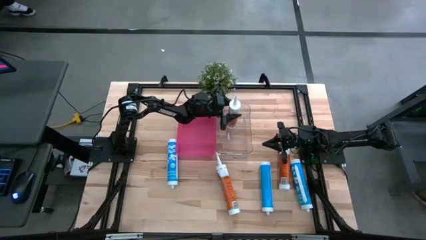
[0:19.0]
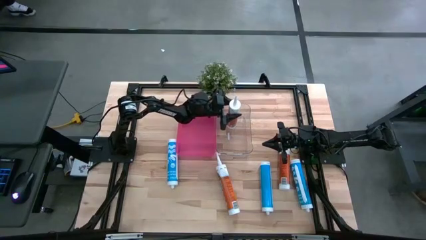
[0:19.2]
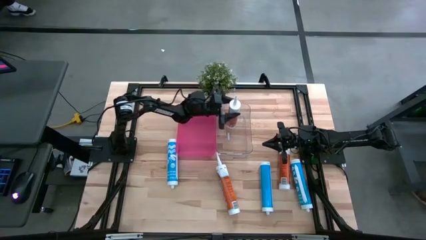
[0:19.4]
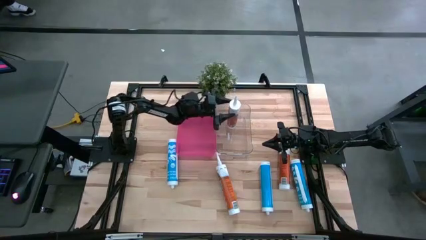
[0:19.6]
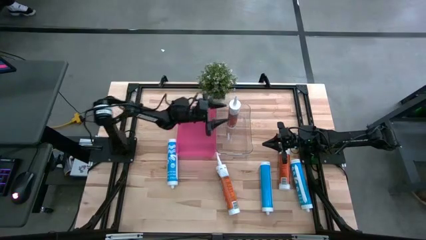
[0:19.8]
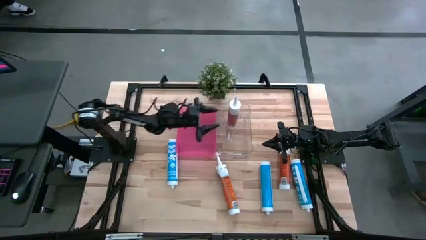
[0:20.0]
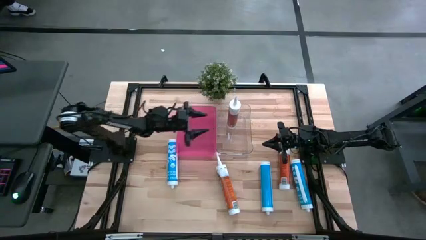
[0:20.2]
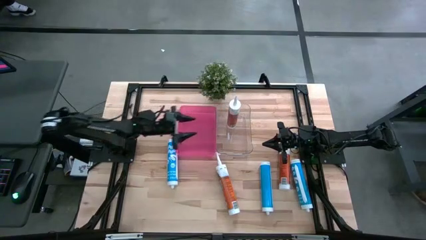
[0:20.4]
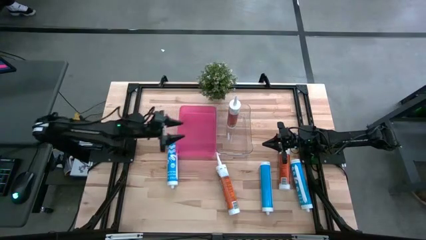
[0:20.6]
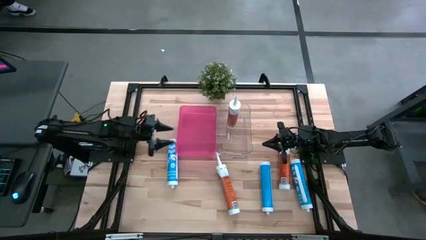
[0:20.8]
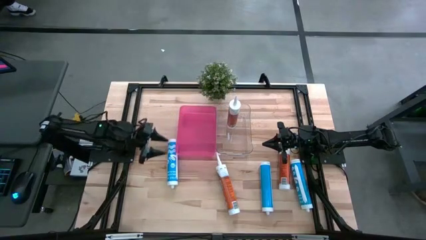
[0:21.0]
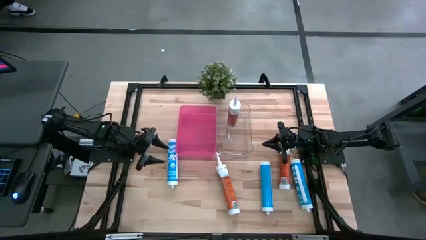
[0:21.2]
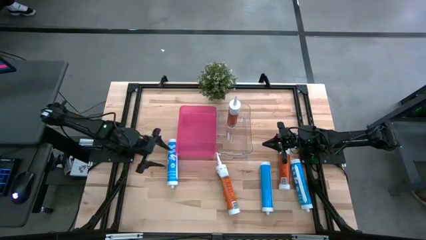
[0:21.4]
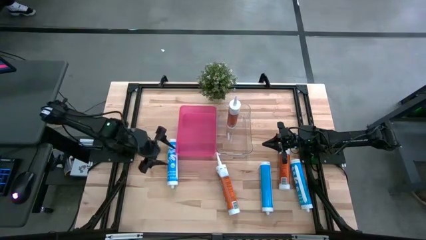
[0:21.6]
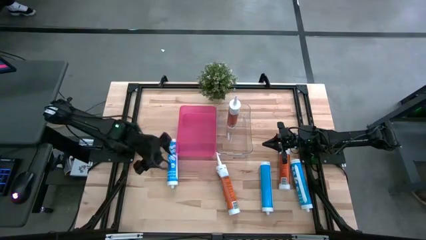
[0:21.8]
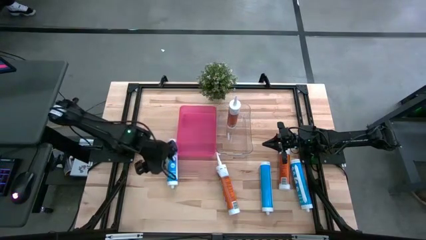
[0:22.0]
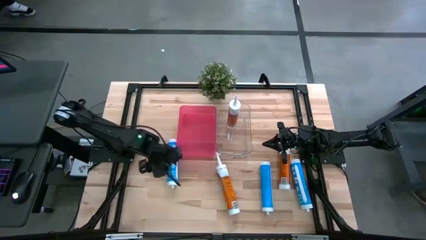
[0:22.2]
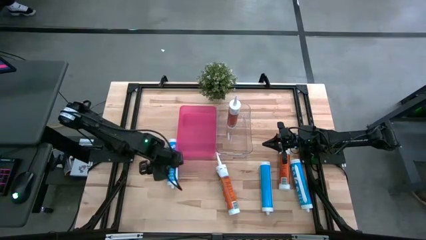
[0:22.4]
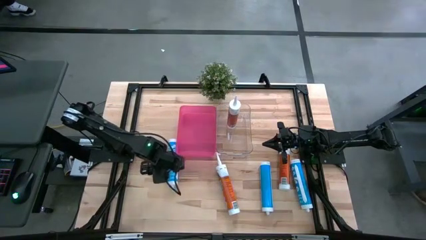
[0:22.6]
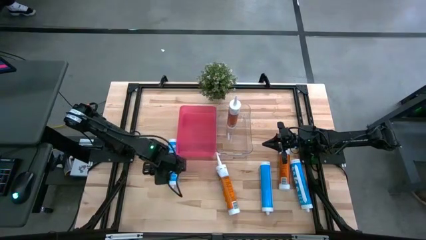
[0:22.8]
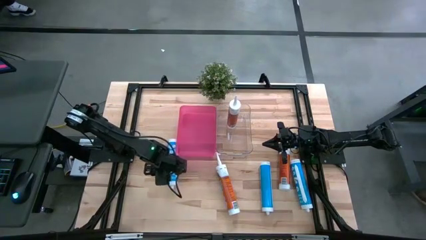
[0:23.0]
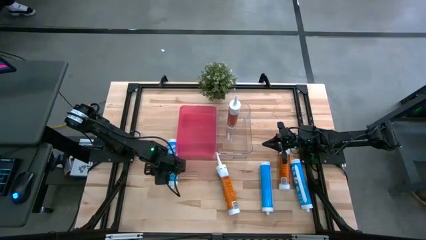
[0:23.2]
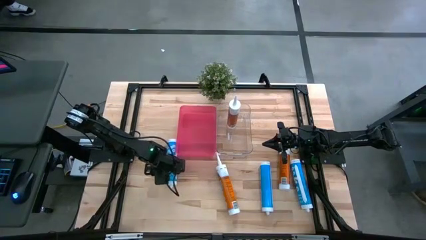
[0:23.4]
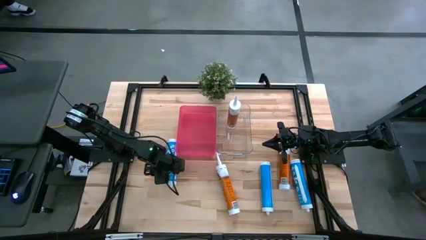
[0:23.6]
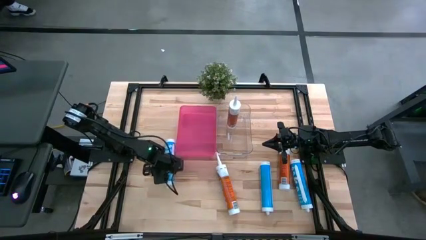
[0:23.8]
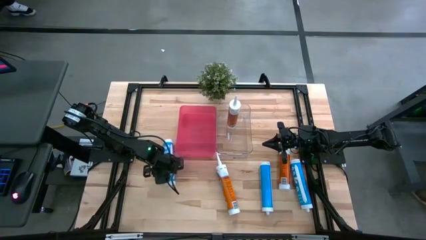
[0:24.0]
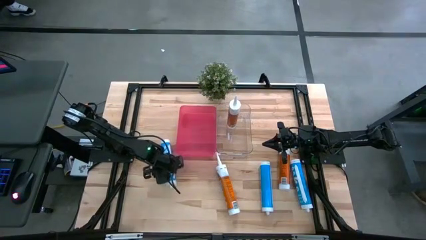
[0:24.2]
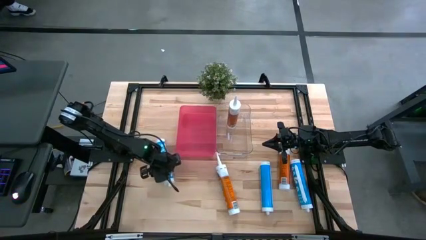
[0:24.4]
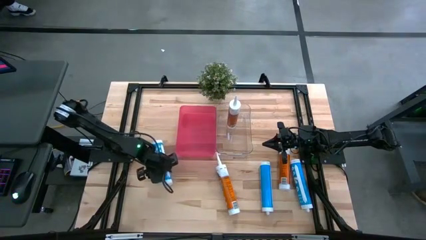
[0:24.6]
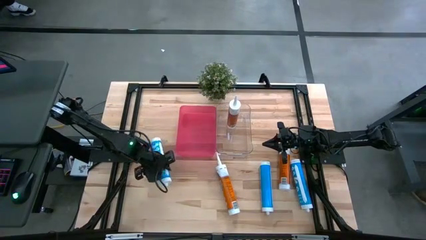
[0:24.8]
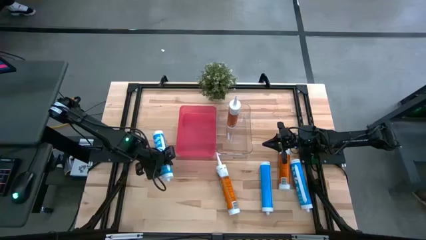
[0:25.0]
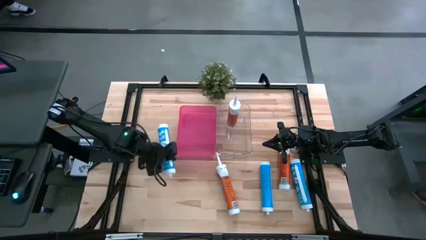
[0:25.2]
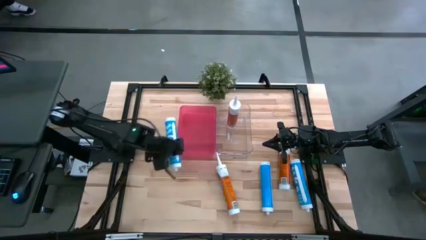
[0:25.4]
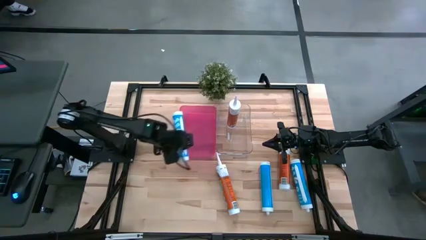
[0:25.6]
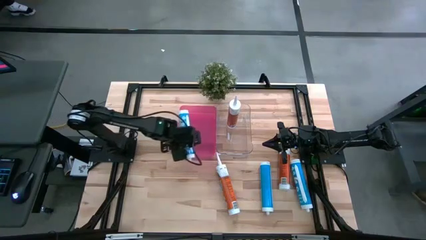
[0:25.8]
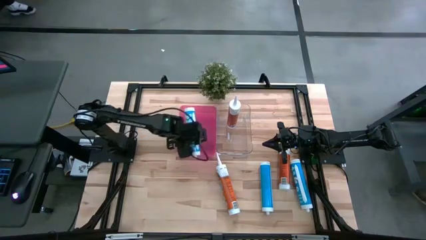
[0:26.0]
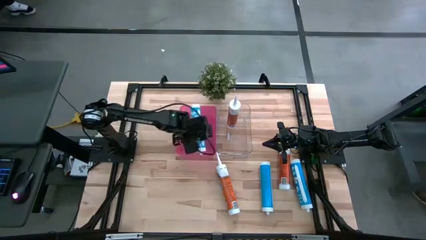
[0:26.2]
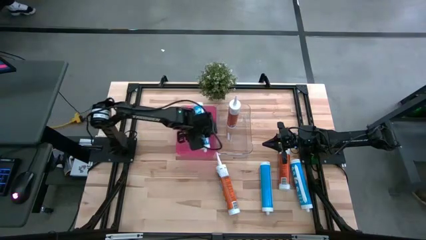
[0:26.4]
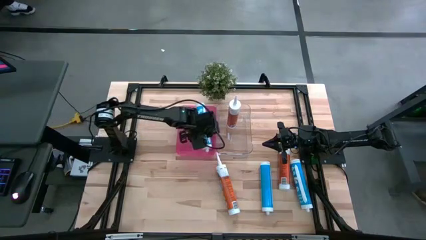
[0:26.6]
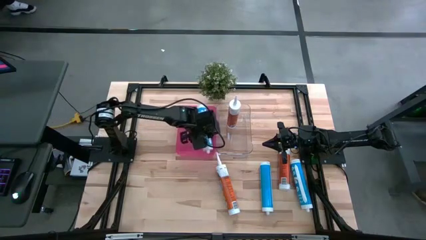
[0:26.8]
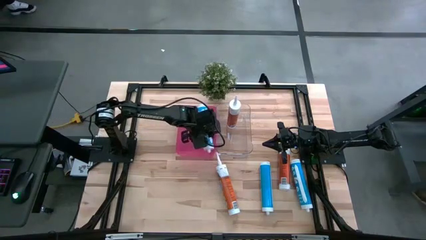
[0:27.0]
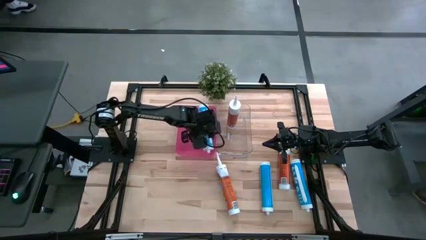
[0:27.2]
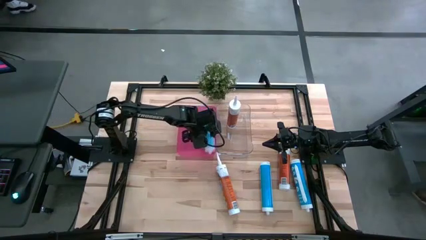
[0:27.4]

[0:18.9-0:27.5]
Task: Pick & place silicon tubes, Sealant and Lysol wipes
Put the left blue sealant into the pink bin

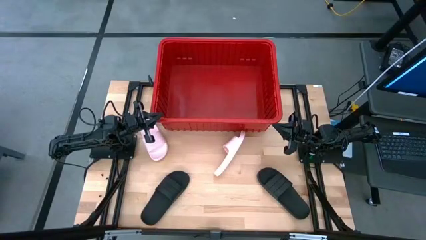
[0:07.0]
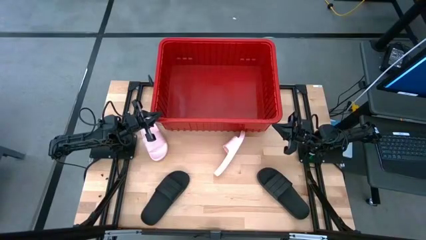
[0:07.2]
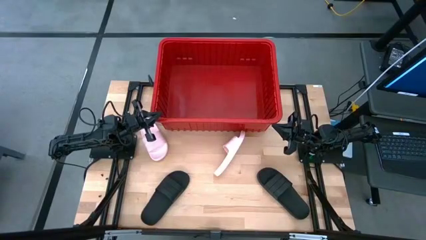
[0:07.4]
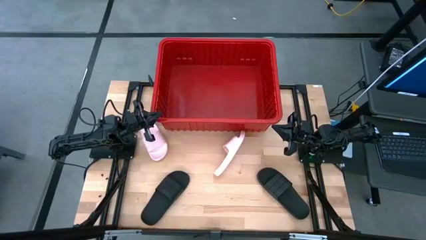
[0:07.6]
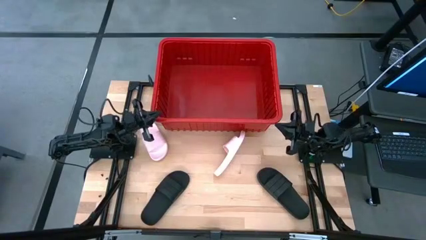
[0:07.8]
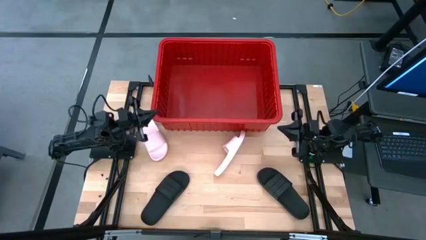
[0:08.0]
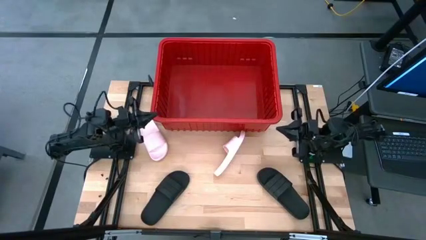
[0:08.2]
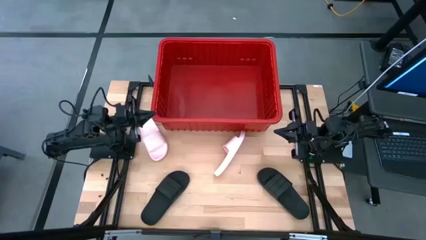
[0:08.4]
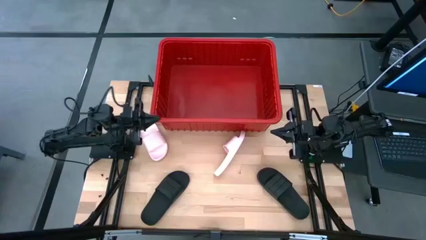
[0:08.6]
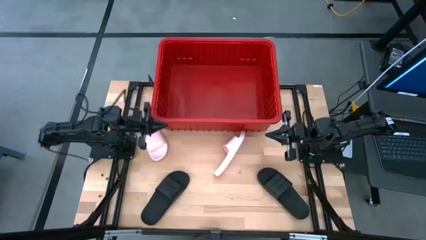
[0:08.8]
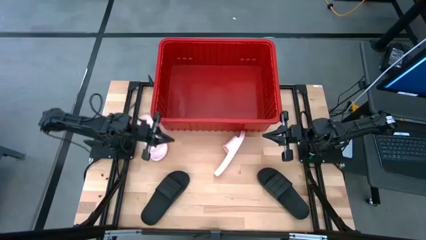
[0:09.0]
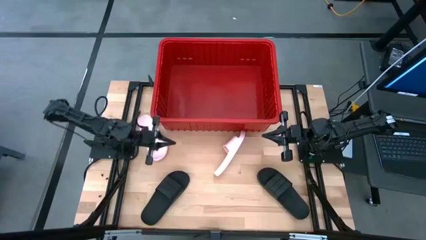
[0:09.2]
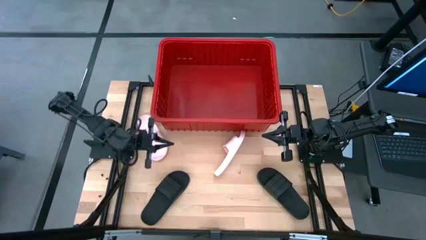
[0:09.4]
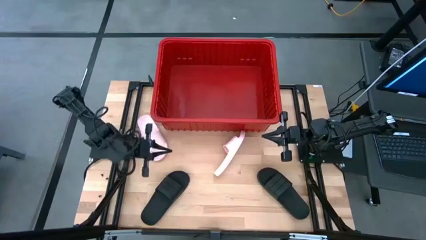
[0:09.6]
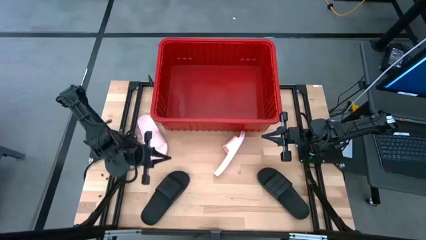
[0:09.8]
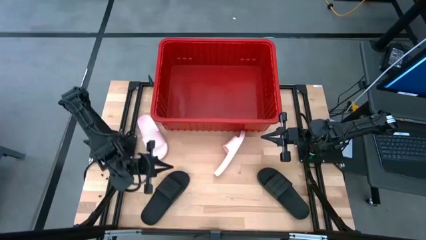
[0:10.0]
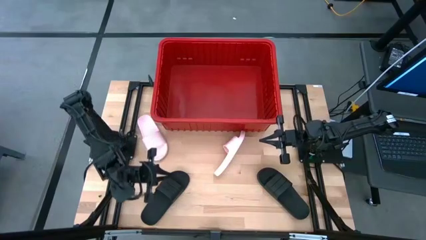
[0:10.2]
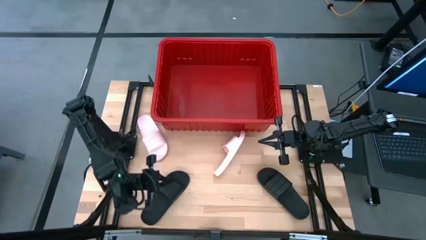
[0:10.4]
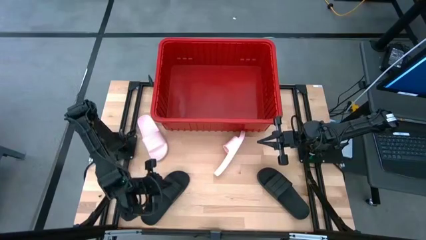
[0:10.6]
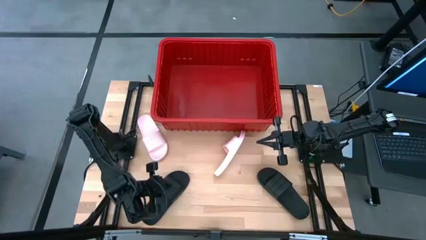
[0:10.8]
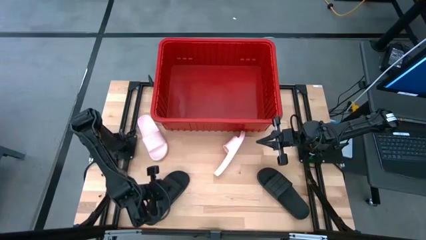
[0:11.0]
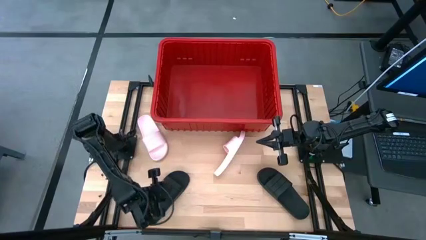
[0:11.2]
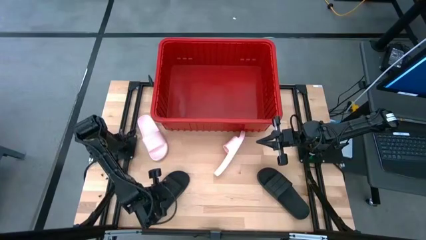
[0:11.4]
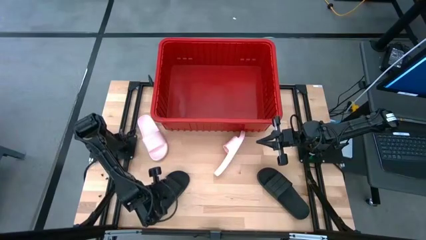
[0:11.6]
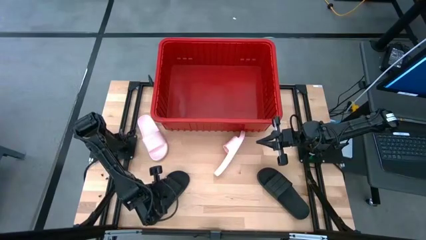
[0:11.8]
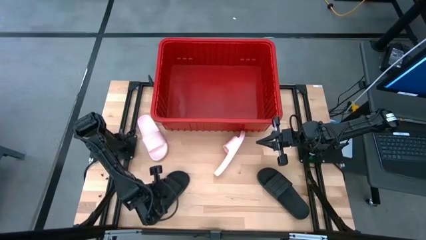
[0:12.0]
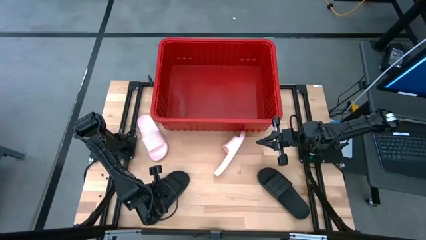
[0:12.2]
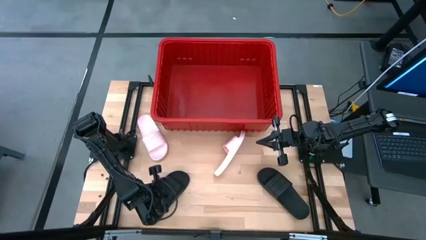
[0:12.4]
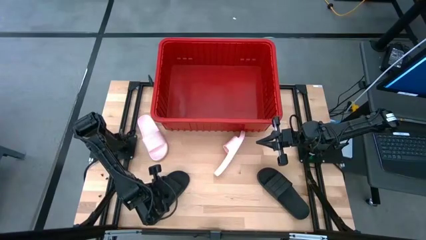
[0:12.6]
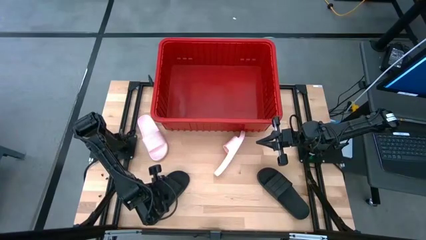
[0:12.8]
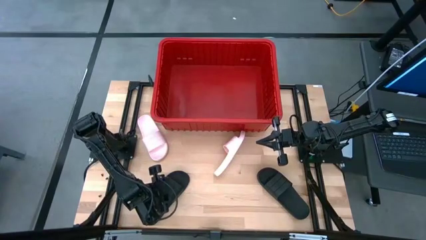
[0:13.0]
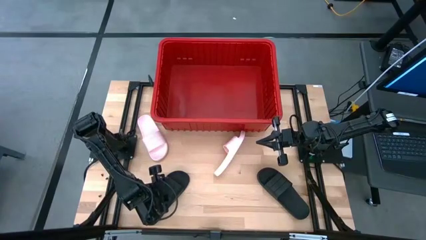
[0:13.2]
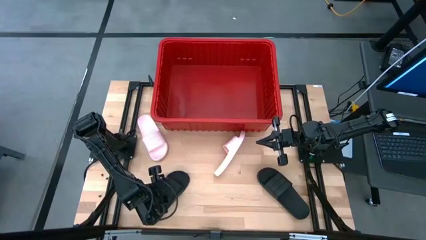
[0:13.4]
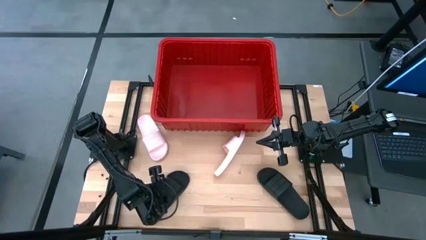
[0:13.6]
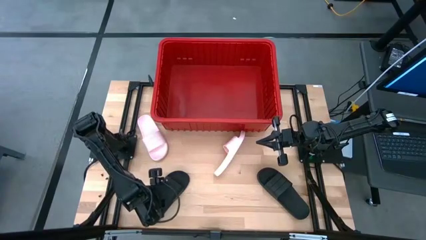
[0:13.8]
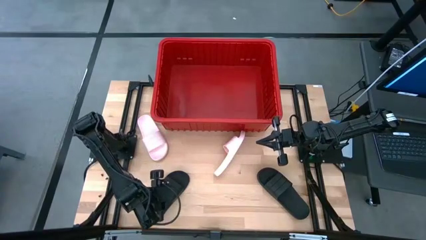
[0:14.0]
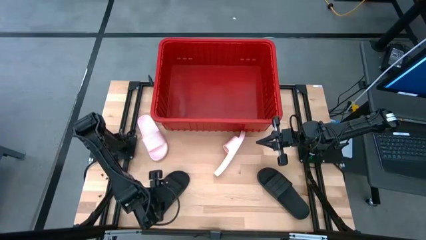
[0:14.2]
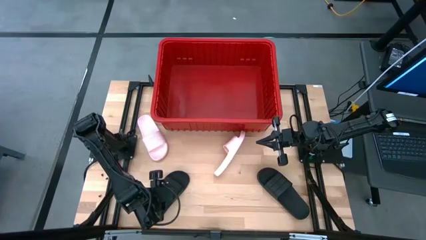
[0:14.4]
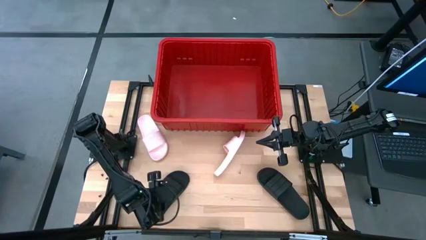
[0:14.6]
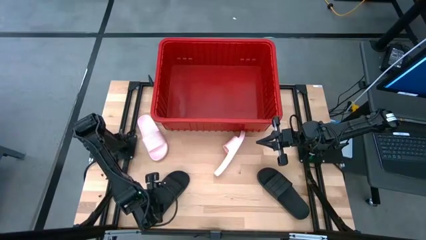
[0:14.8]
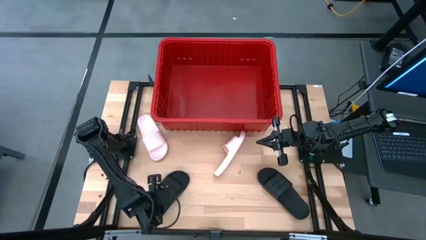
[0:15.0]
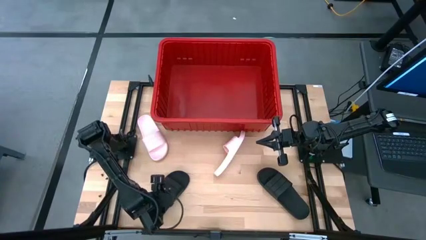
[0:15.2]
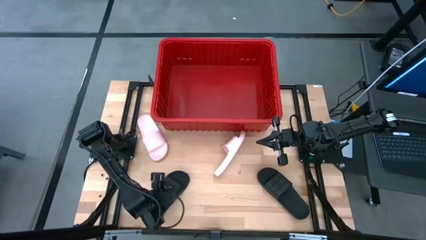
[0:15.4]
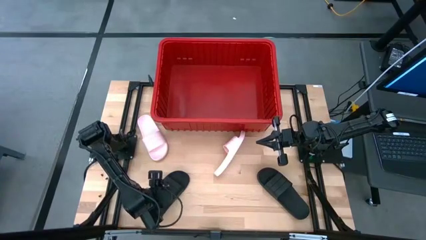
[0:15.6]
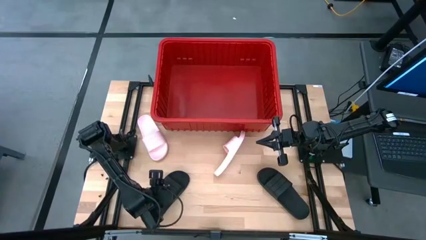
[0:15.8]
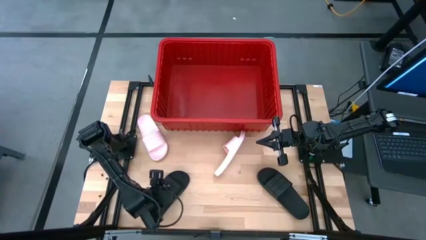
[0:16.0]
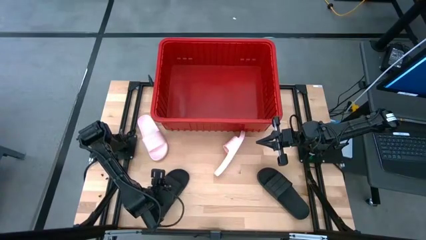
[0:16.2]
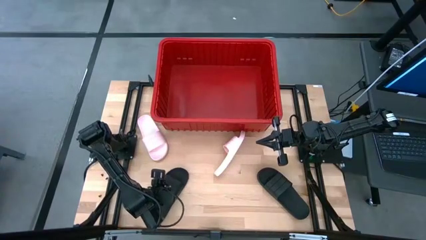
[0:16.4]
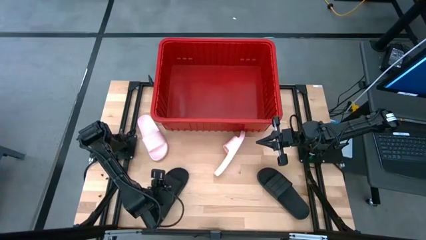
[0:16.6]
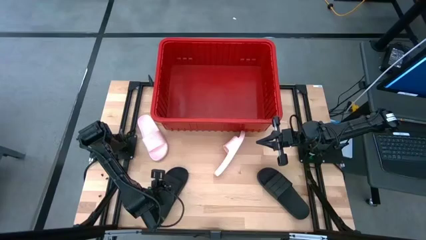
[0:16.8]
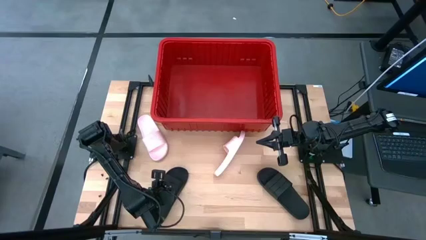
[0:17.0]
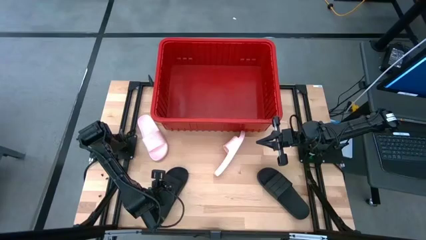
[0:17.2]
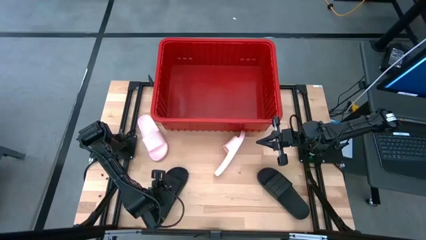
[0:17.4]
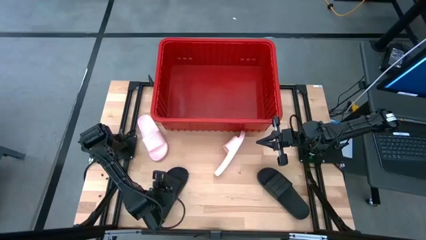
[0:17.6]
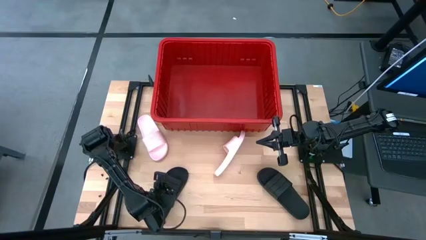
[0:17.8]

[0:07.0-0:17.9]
Task: Pick and place slides into bin
Put the left black slide into the red bin
